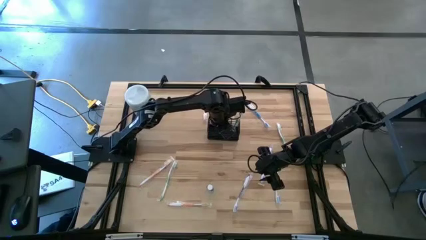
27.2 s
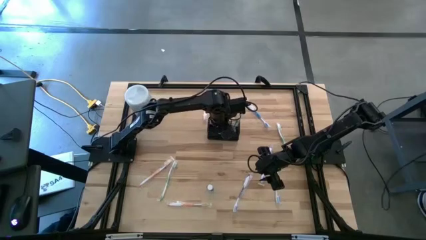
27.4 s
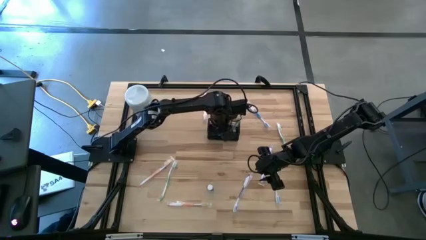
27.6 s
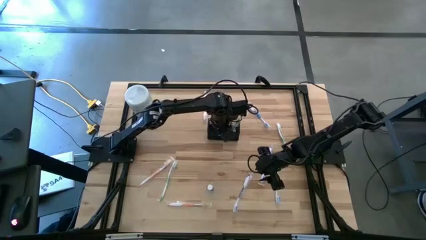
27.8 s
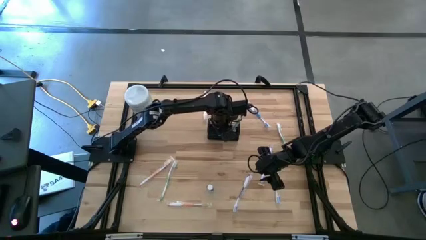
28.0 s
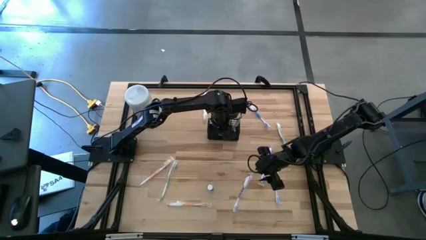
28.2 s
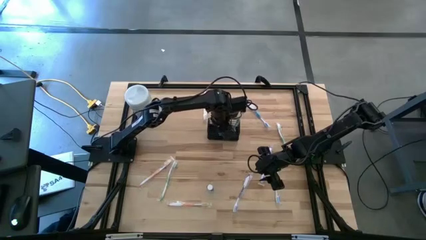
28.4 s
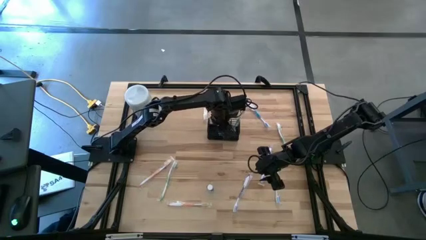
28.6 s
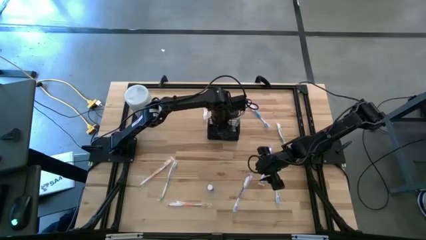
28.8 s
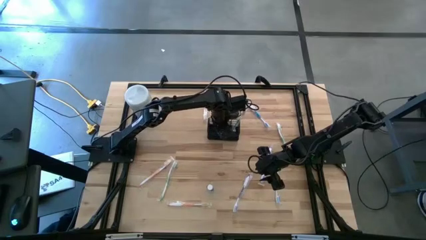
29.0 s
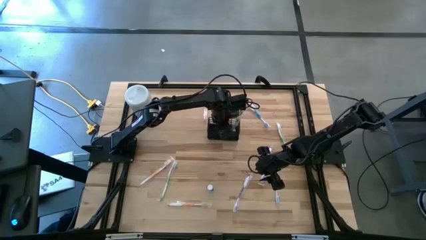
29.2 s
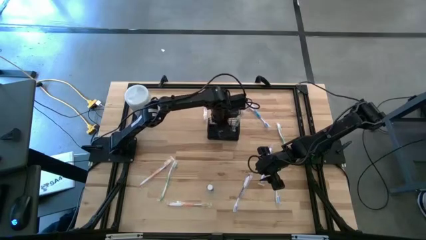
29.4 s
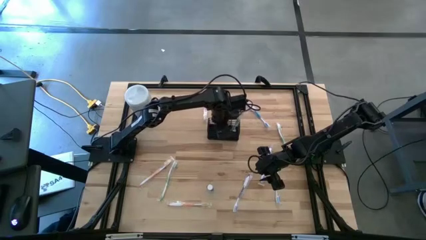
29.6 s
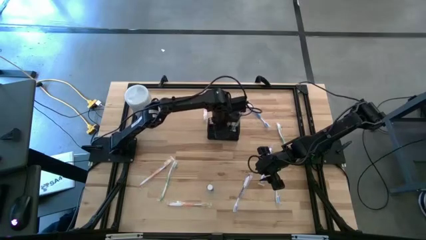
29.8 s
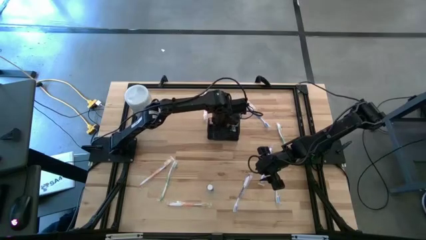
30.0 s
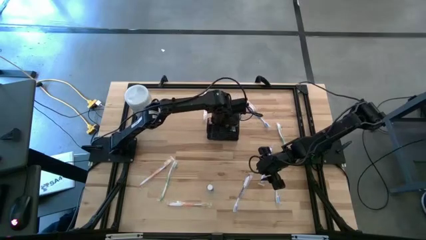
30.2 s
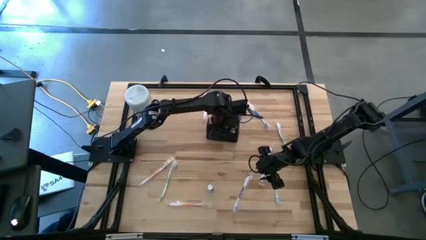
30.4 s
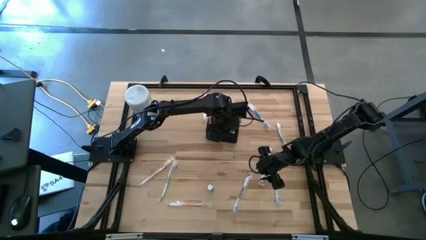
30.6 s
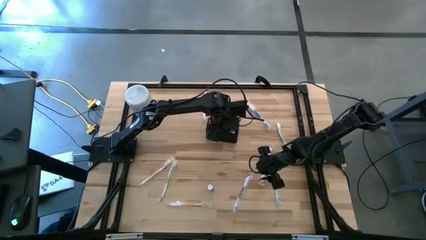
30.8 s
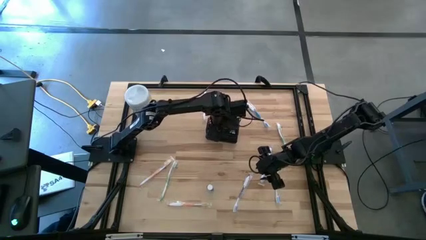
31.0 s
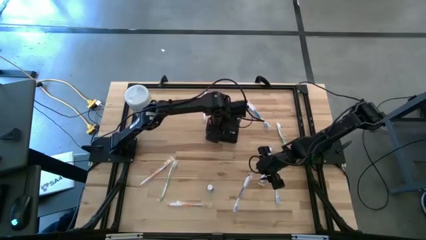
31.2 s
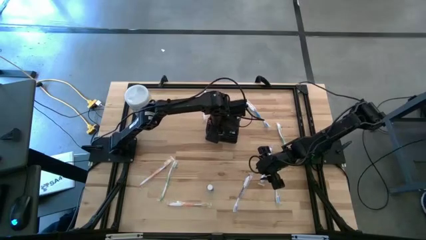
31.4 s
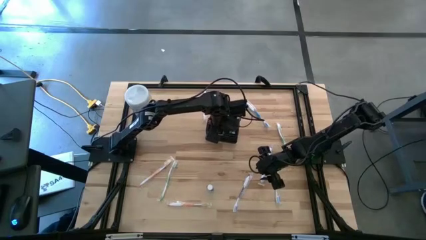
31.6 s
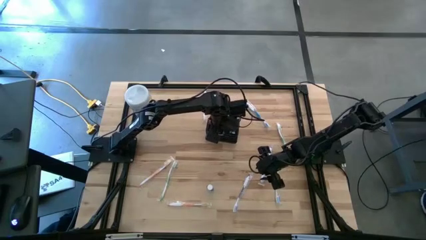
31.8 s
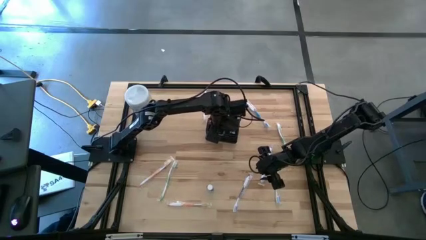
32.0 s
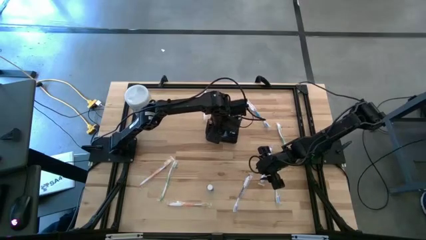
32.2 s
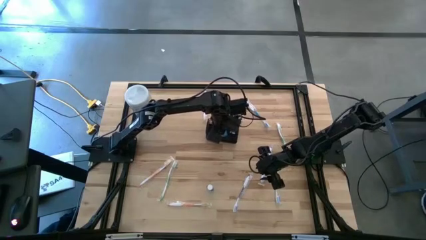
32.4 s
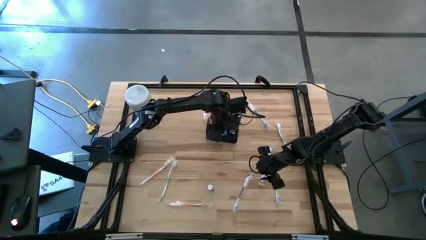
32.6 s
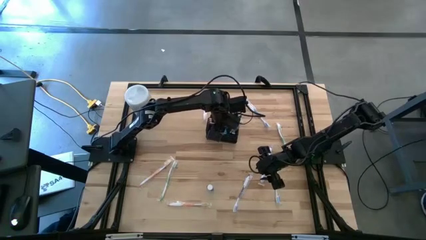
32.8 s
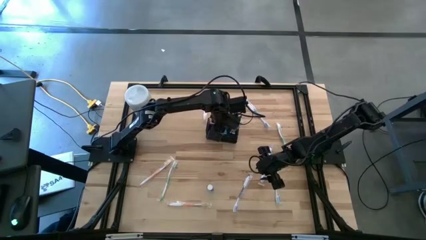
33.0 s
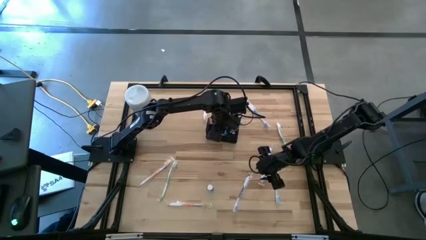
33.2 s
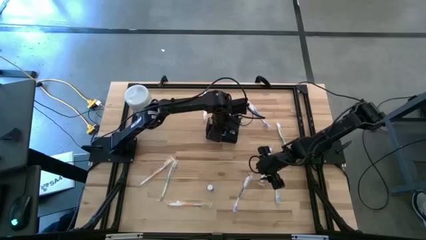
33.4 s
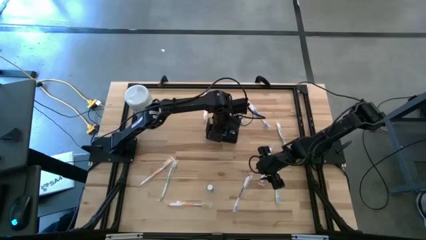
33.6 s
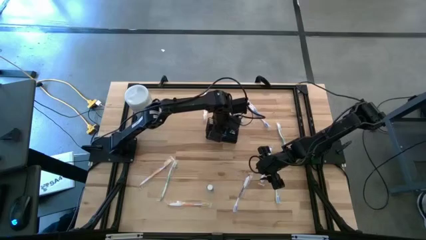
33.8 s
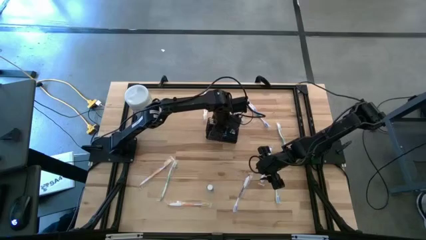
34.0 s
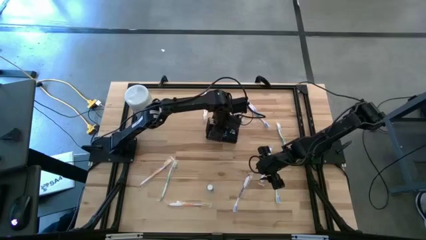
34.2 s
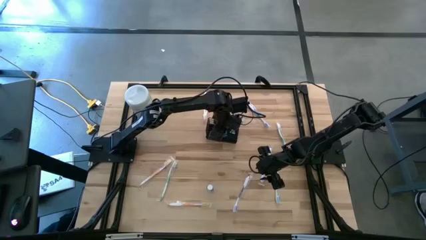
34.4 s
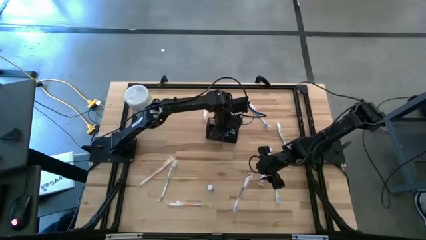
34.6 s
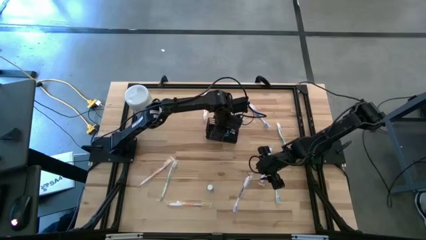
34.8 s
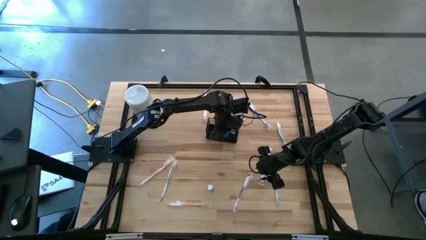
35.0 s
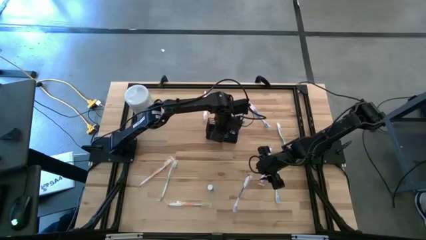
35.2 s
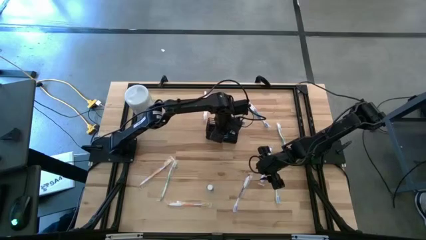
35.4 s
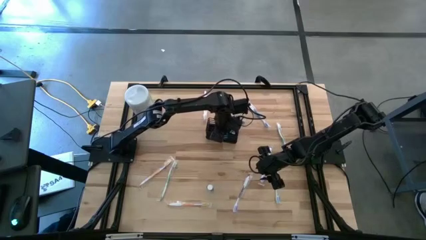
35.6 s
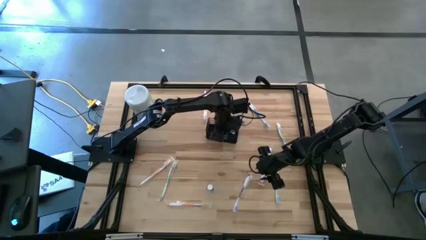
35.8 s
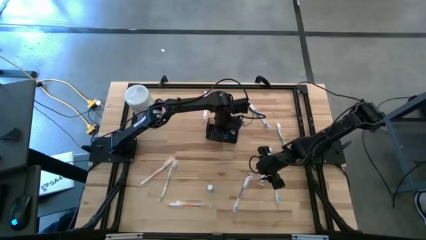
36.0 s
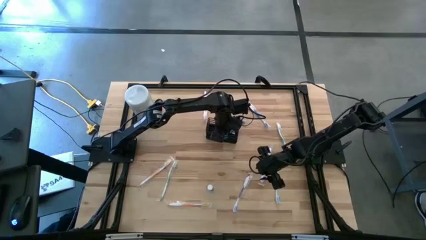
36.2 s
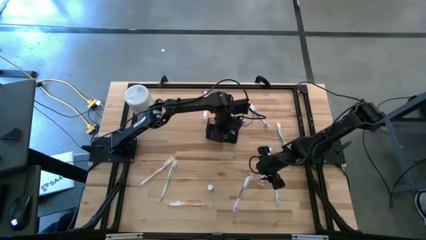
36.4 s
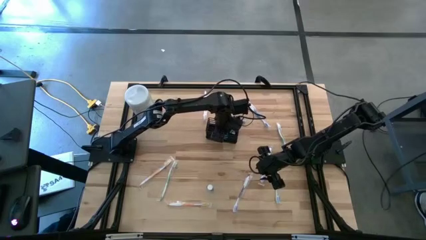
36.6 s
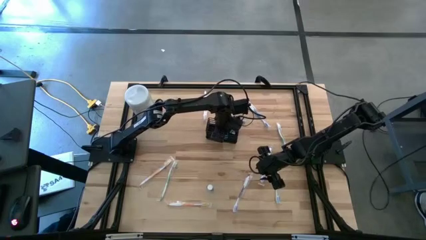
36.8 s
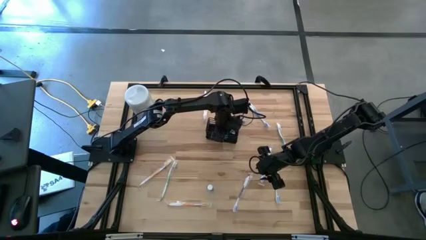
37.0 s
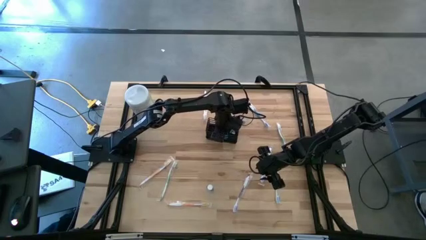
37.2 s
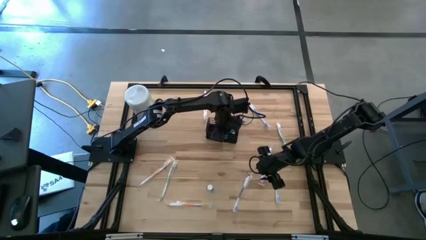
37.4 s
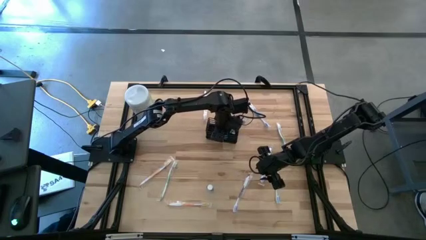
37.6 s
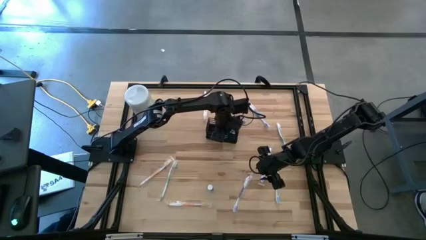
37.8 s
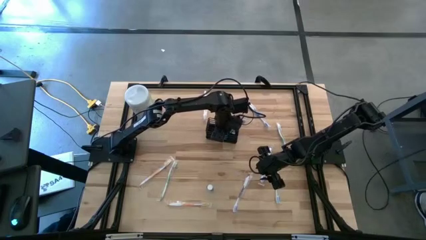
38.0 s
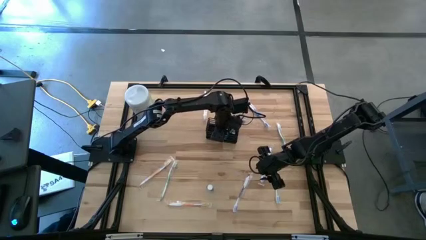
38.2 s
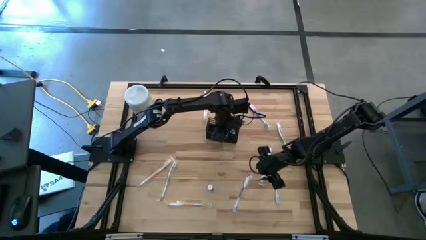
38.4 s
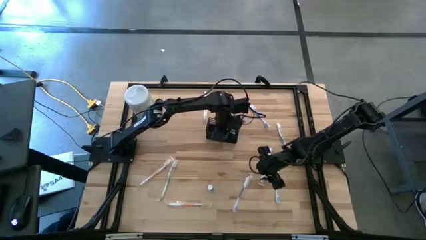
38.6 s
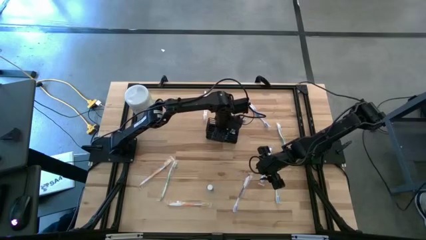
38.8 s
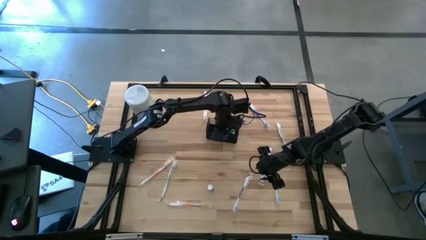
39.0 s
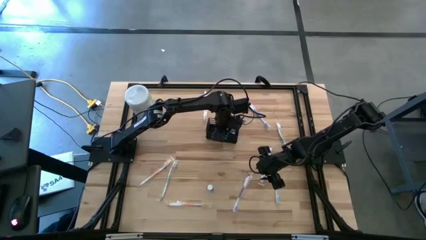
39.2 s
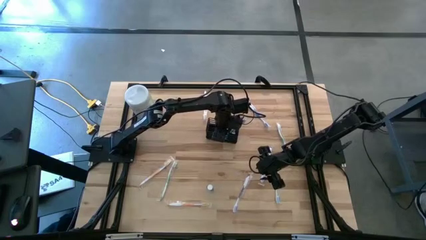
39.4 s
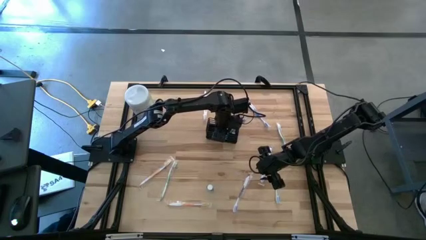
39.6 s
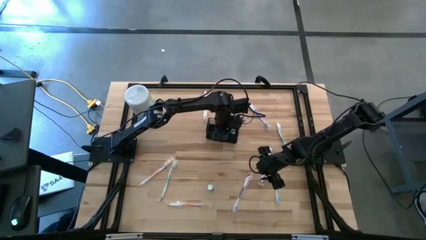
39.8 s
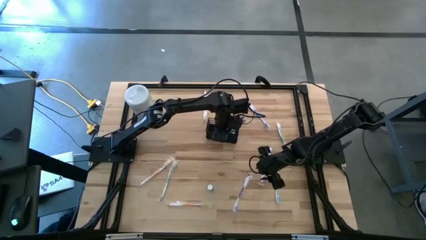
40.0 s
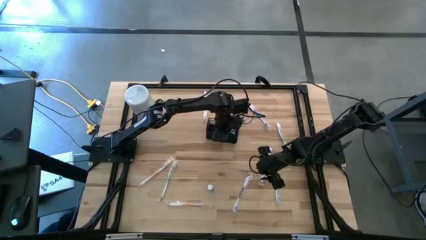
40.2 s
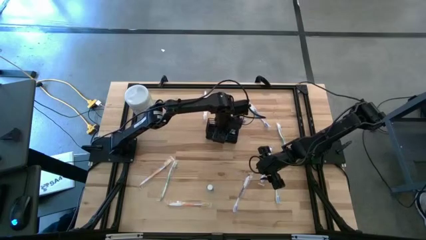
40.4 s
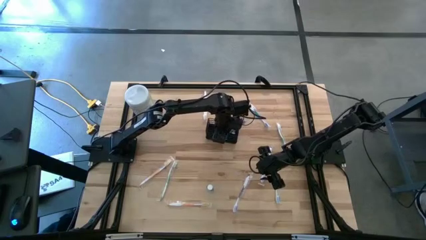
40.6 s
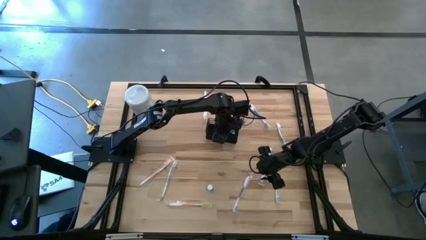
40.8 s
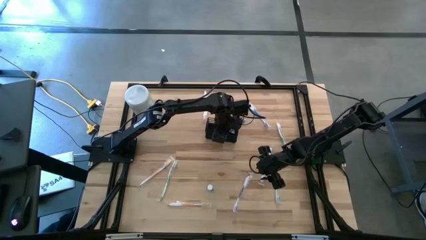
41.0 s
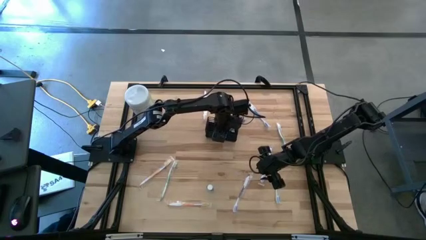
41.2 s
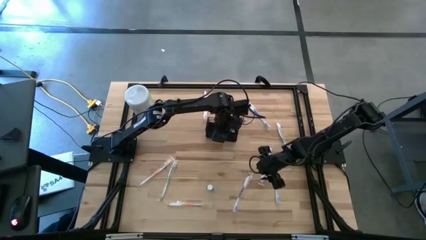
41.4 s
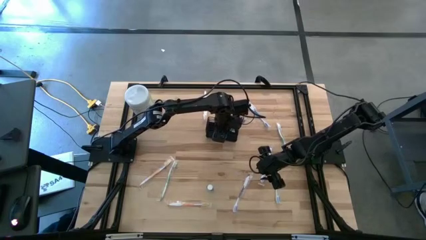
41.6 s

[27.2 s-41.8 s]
Task: Pick & Place toothbrushing station
Put the top mouthwash into the mesh organizer
